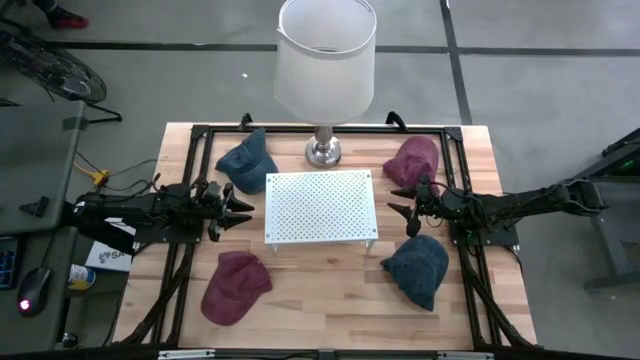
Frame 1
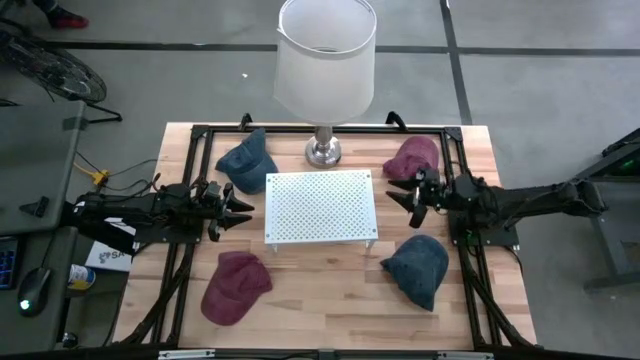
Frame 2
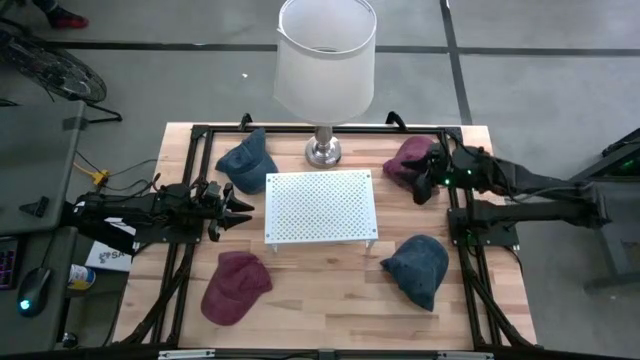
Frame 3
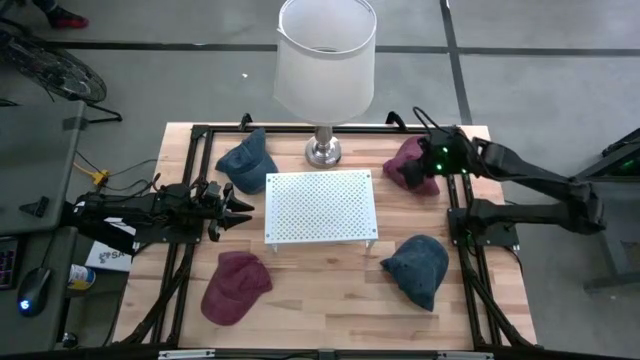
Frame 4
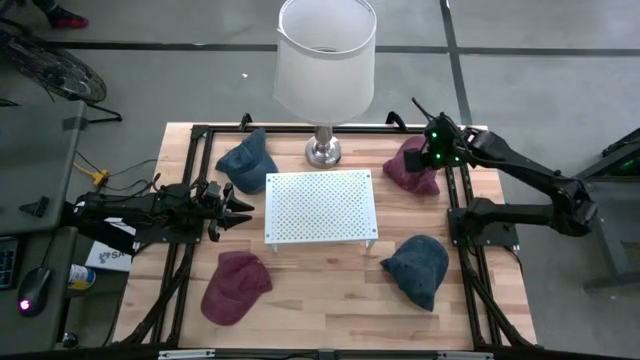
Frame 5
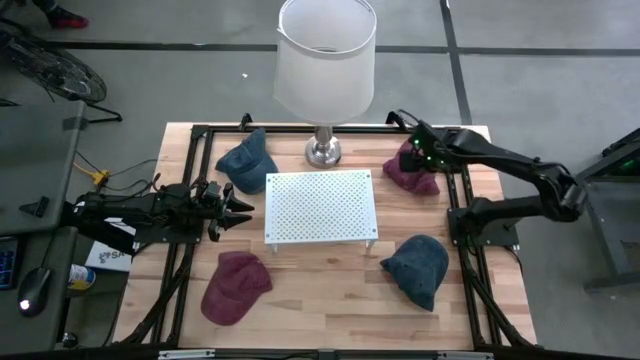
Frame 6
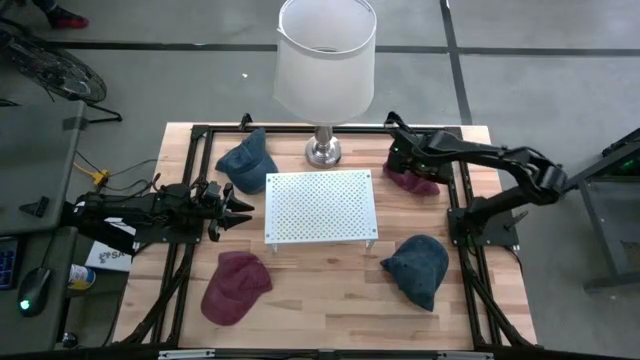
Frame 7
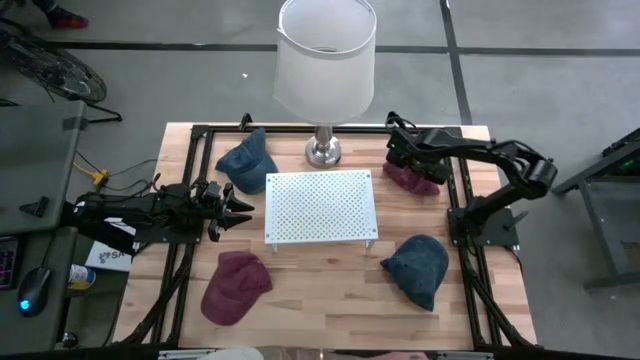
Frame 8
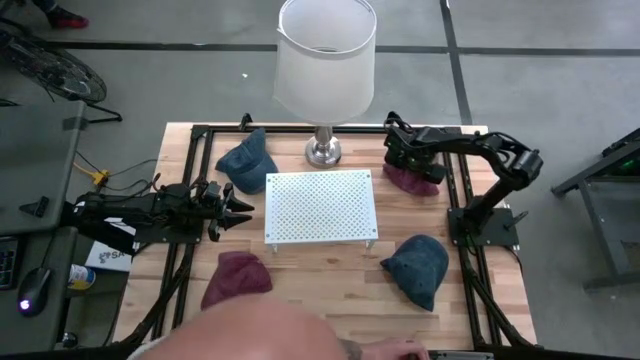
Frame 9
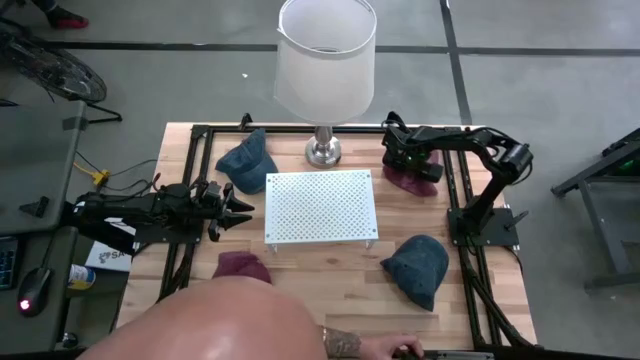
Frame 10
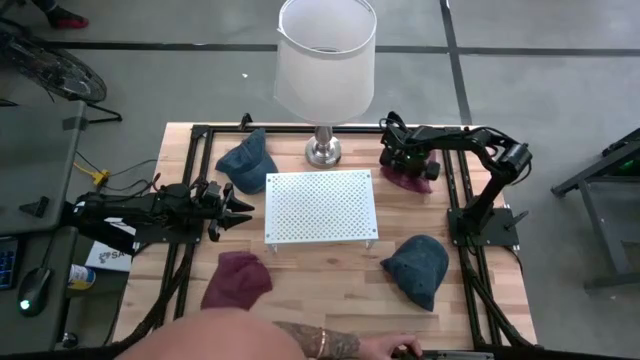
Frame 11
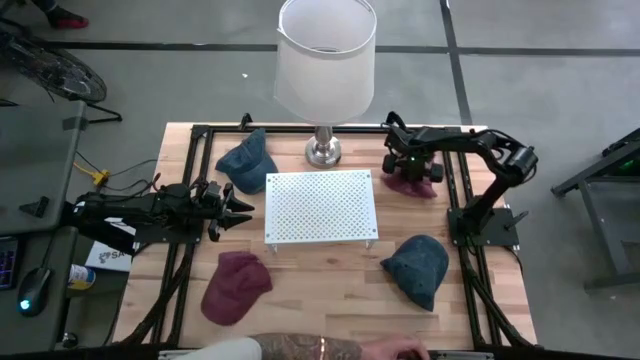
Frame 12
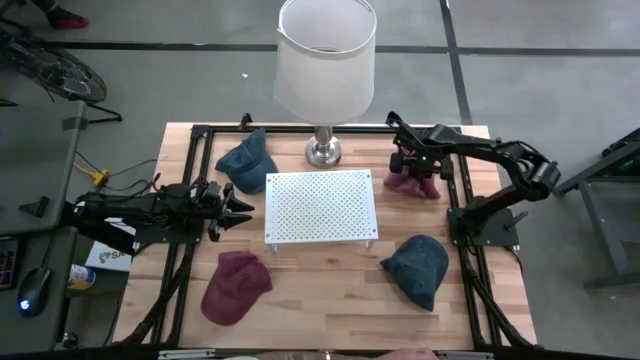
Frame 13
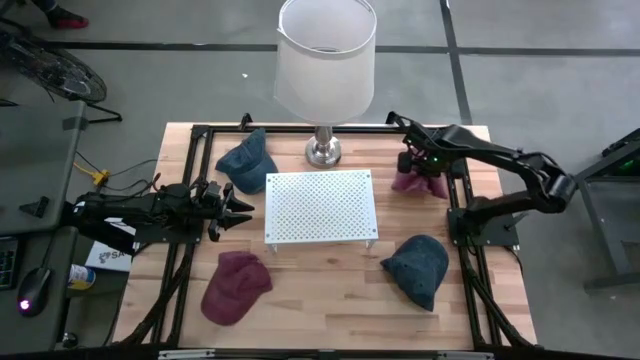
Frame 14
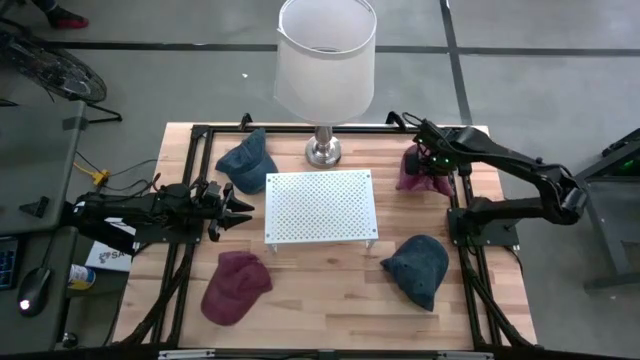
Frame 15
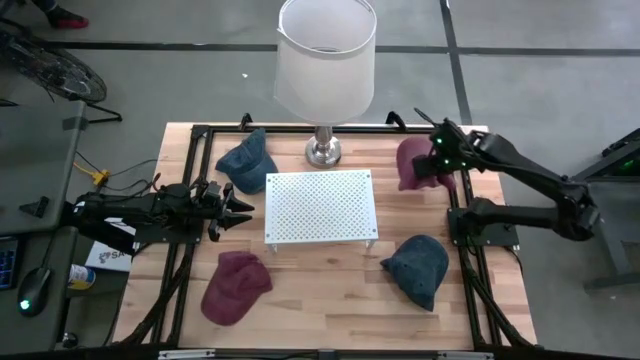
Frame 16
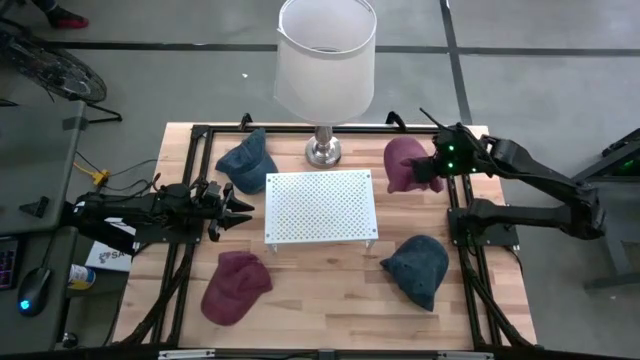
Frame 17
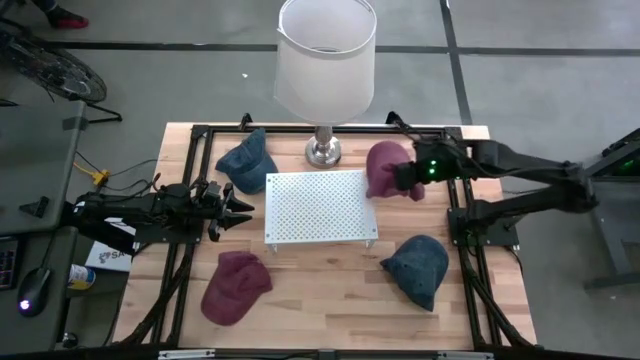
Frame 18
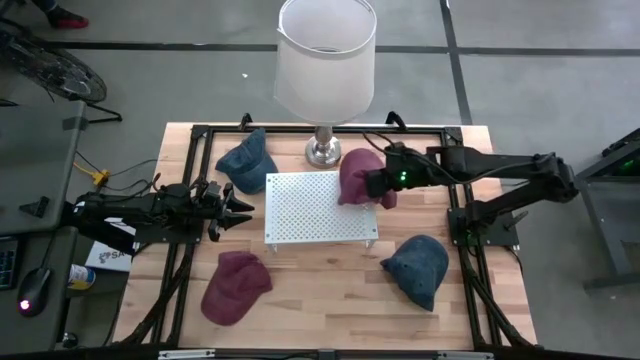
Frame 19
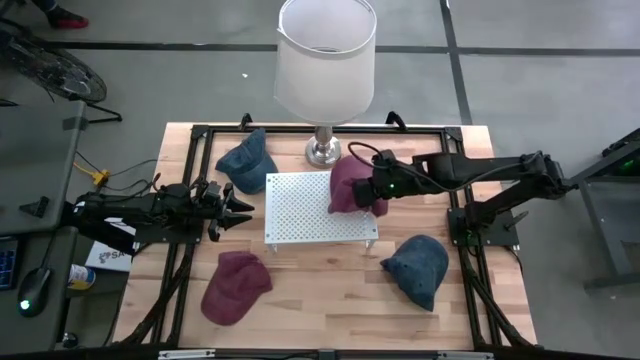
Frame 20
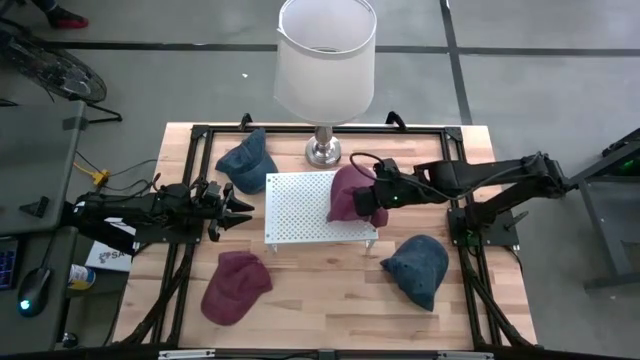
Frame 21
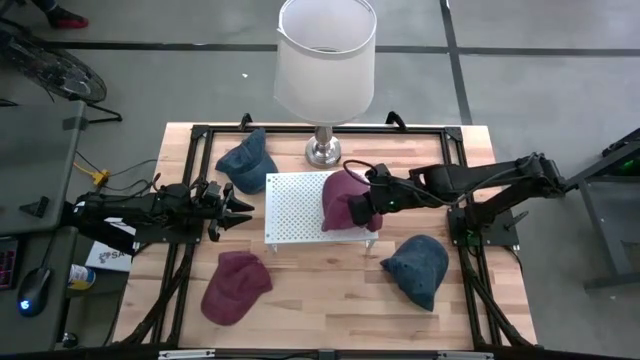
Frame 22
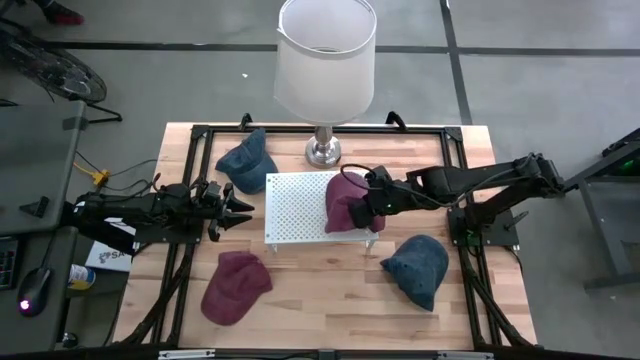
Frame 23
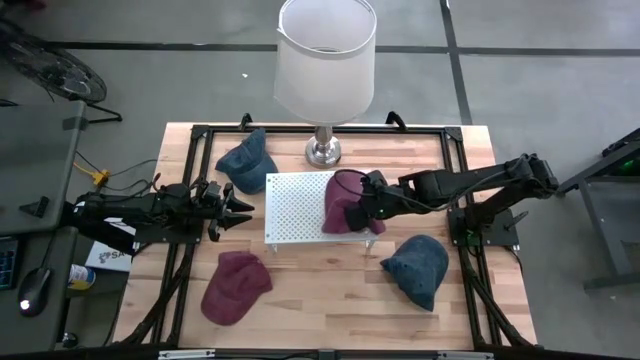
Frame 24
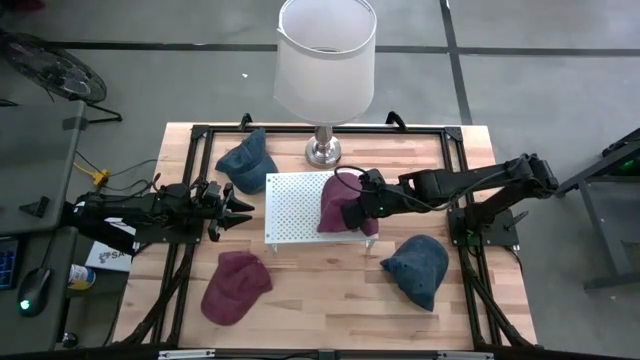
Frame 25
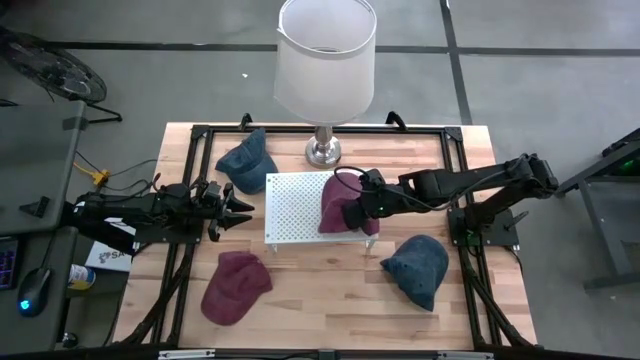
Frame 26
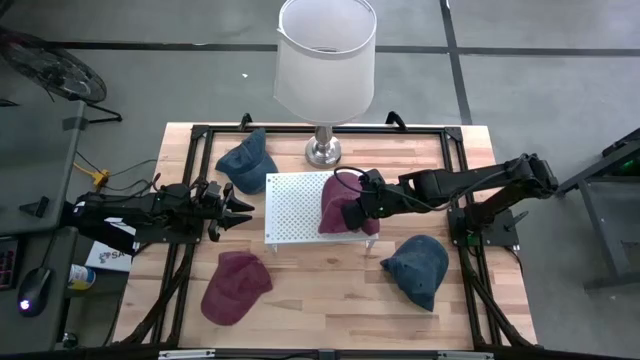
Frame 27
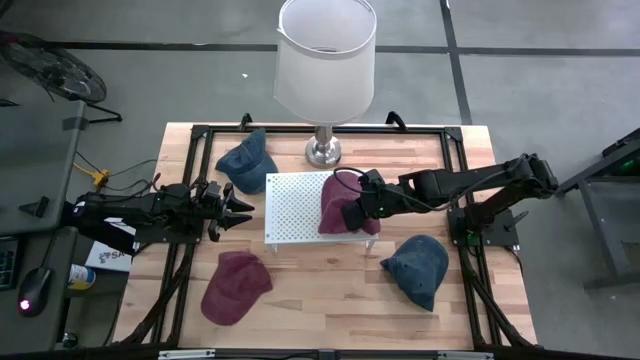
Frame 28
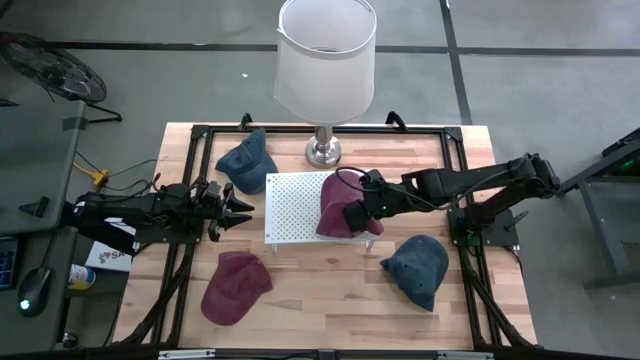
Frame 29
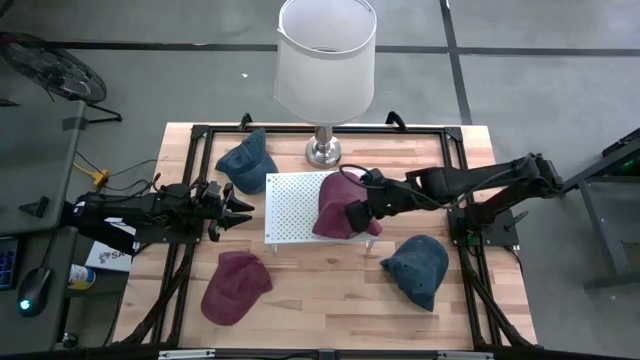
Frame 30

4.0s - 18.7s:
Task: Pick & Place hat
Put the top red cap on the shelf

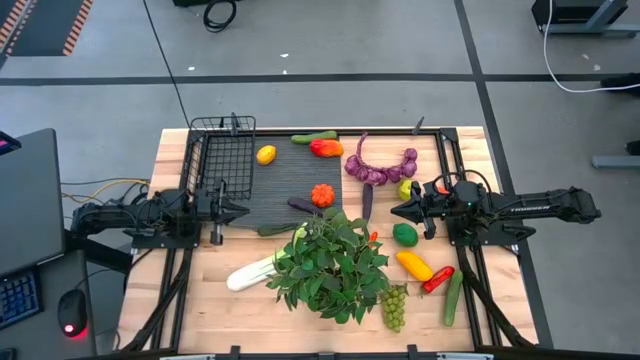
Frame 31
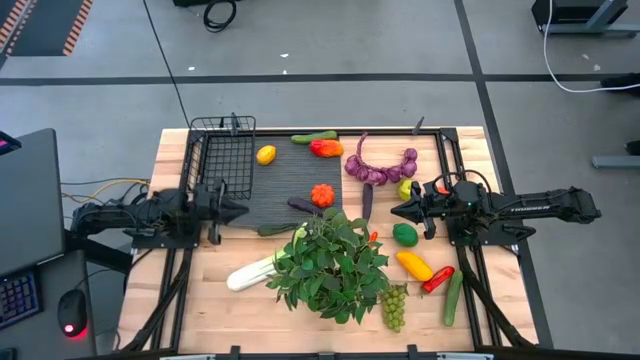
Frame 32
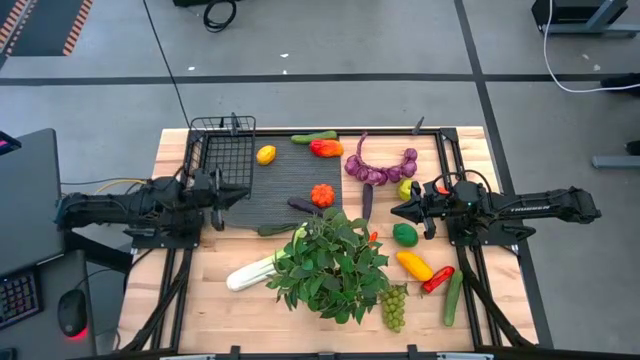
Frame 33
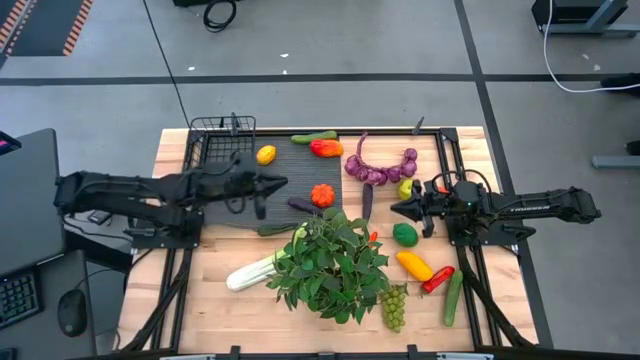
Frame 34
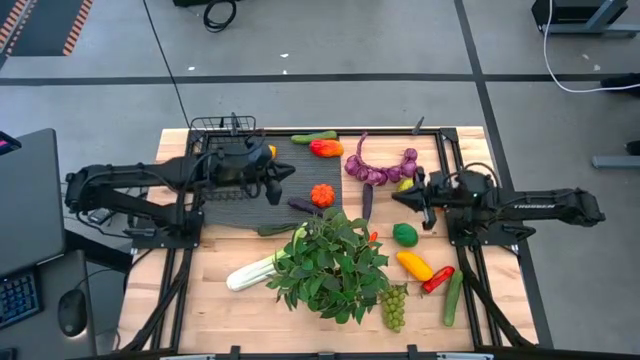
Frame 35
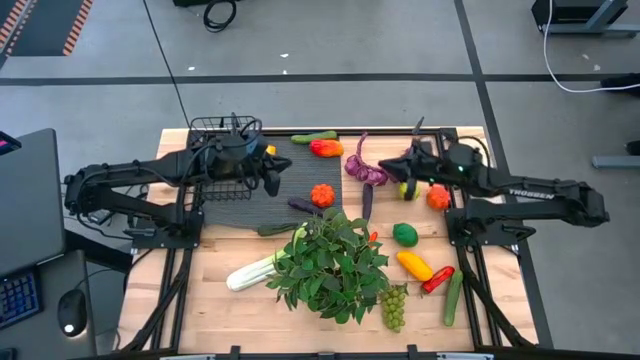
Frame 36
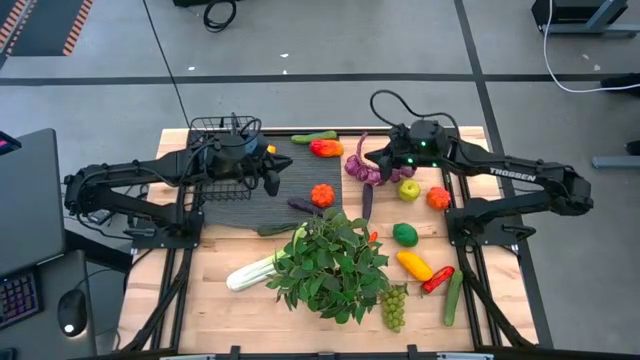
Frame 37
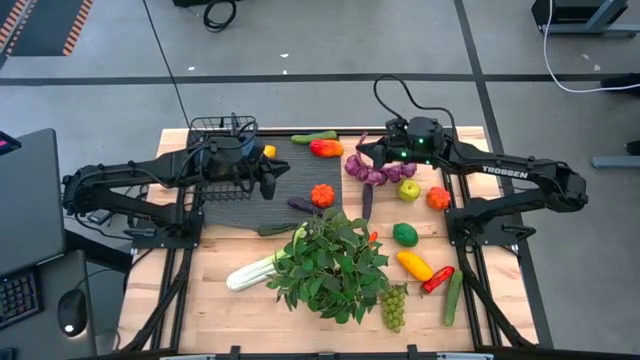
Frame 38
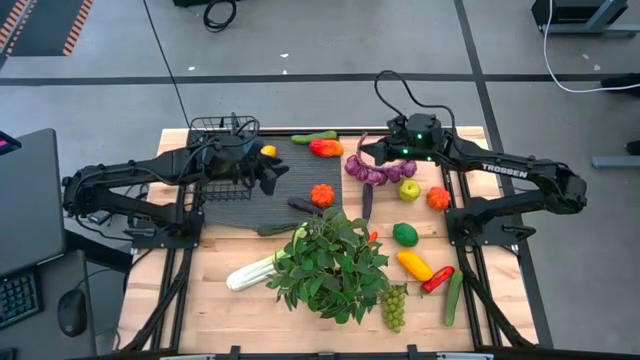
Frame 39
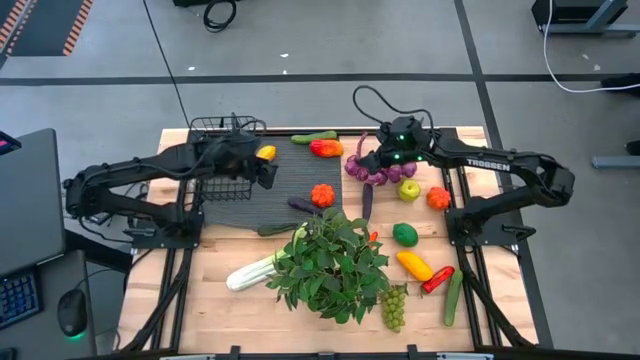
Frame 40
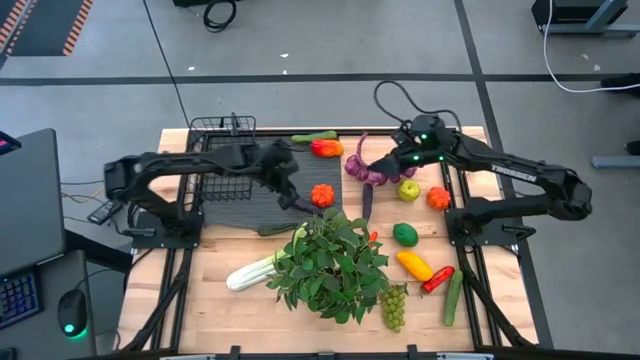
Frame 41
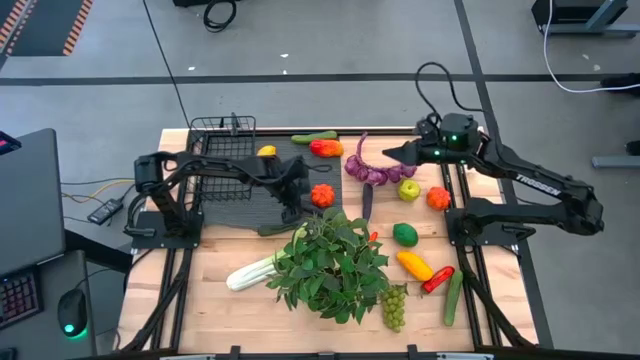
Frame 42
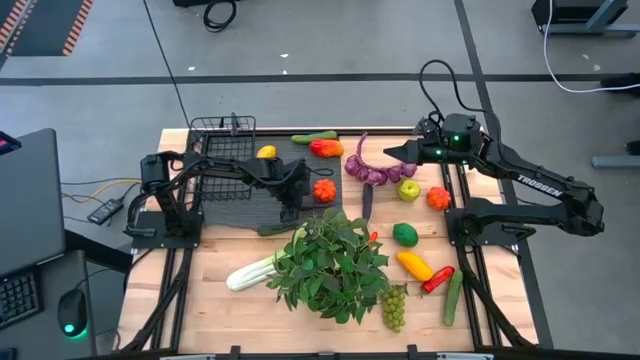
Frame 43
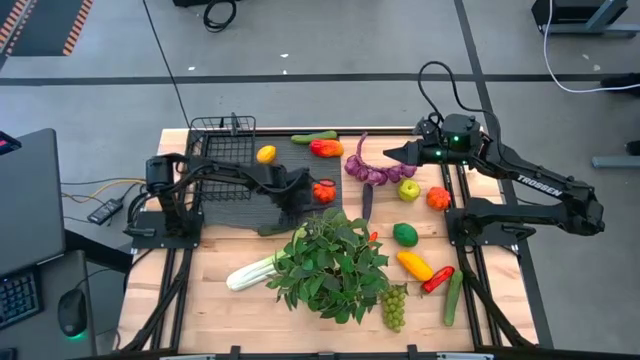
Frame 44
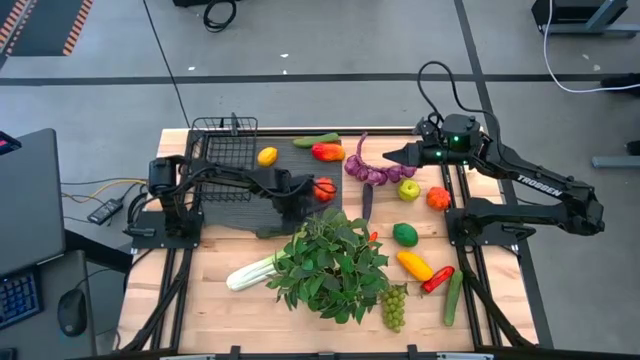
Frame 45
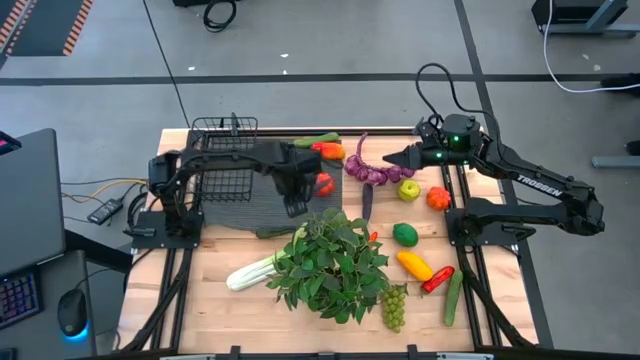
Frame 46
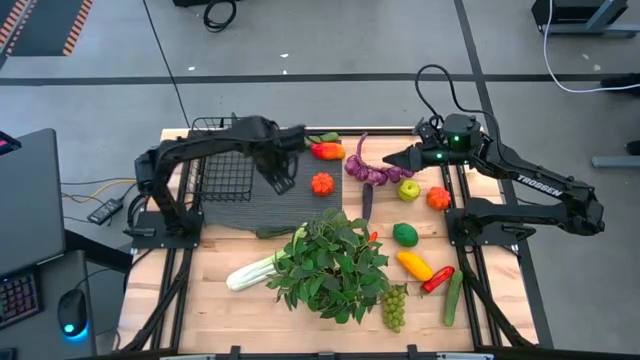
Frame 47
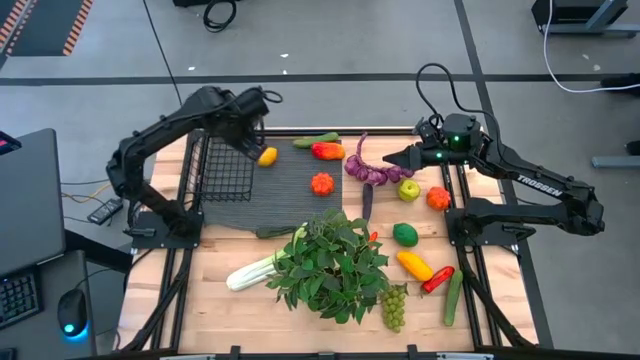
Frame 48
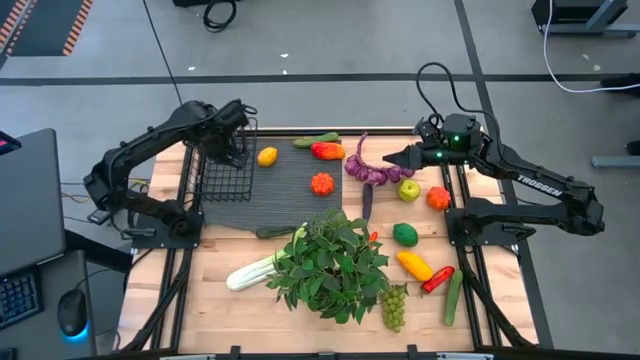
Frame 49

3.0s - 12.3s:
Task: Build produce basket
Put the left violet eggplant into the wire basket
